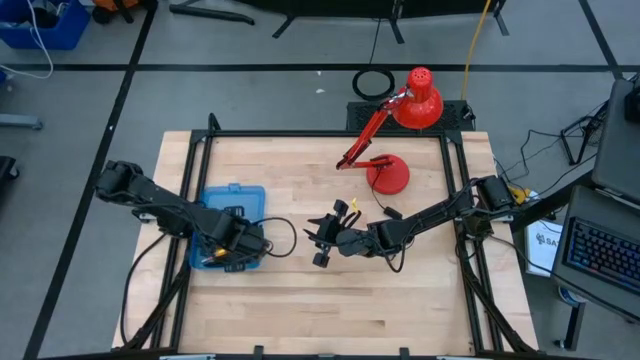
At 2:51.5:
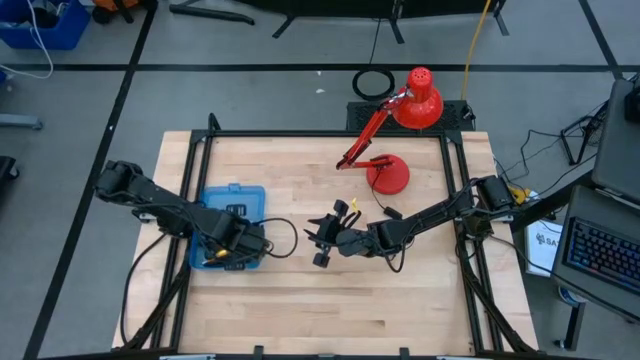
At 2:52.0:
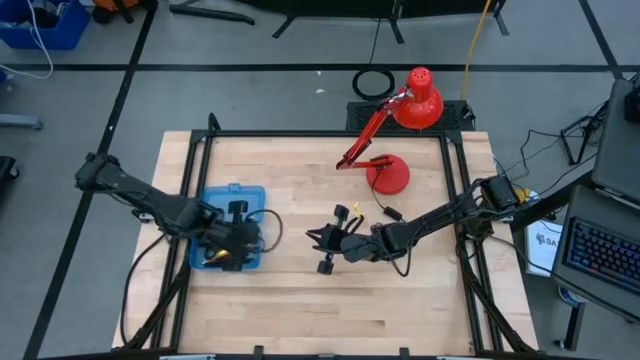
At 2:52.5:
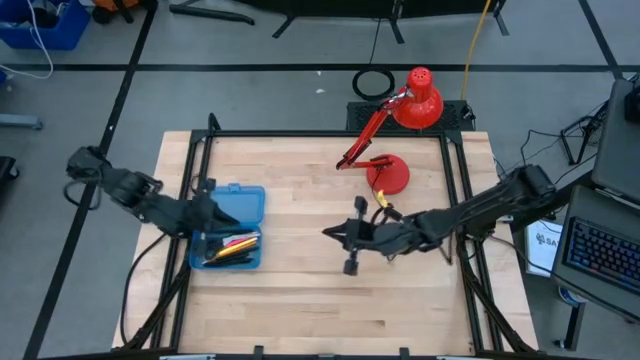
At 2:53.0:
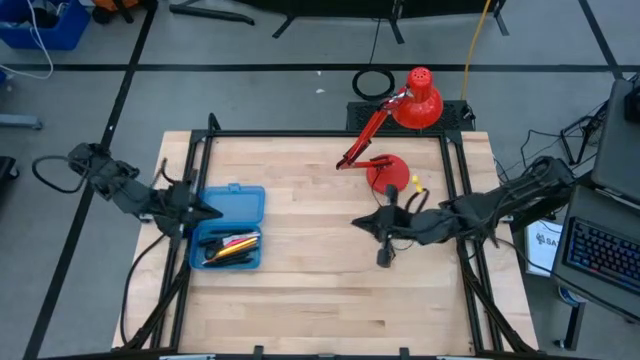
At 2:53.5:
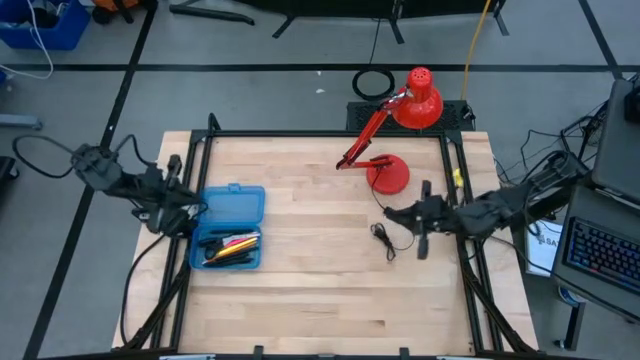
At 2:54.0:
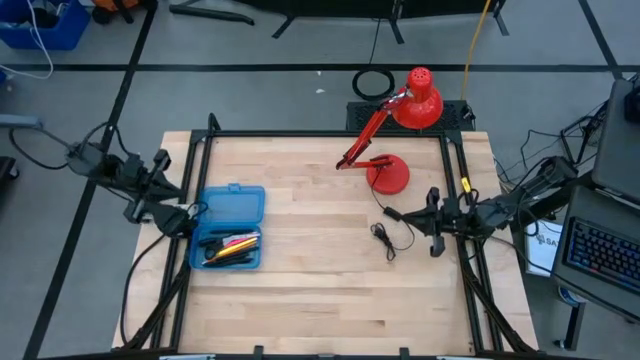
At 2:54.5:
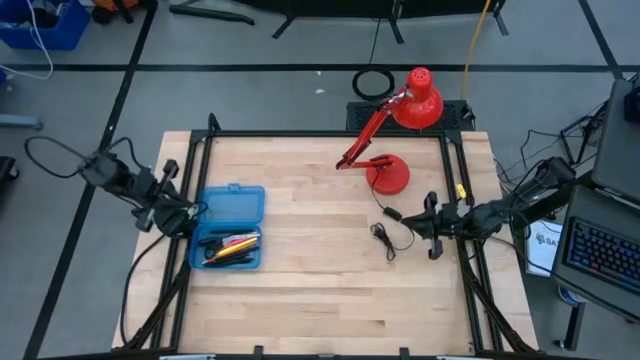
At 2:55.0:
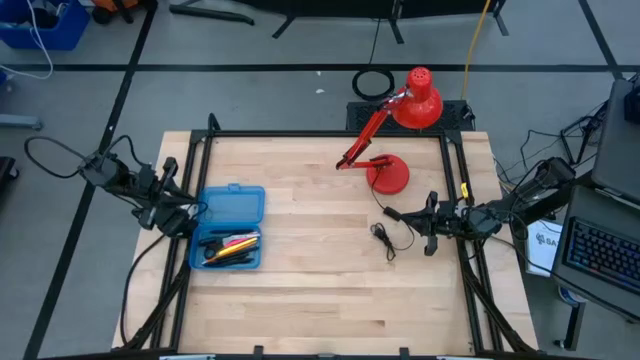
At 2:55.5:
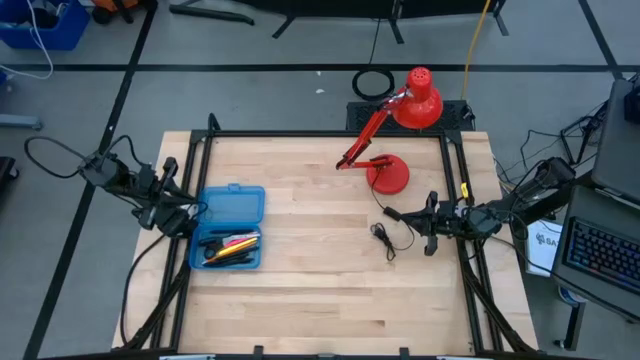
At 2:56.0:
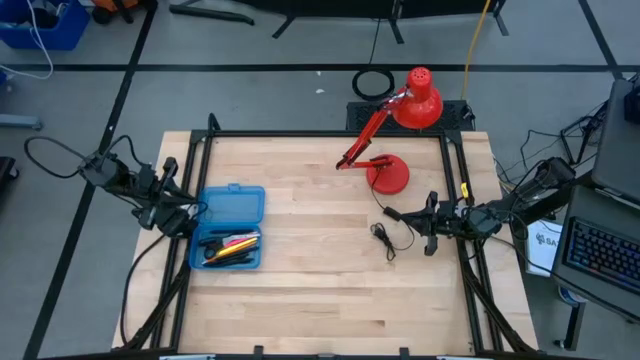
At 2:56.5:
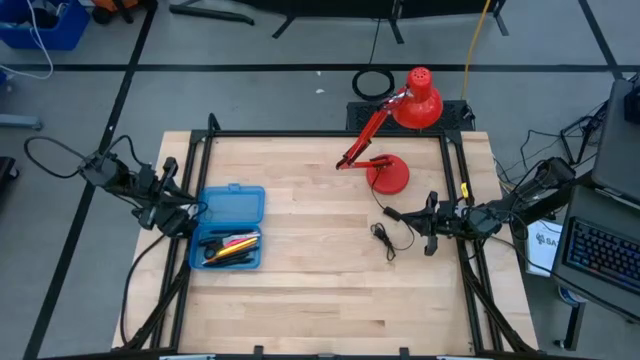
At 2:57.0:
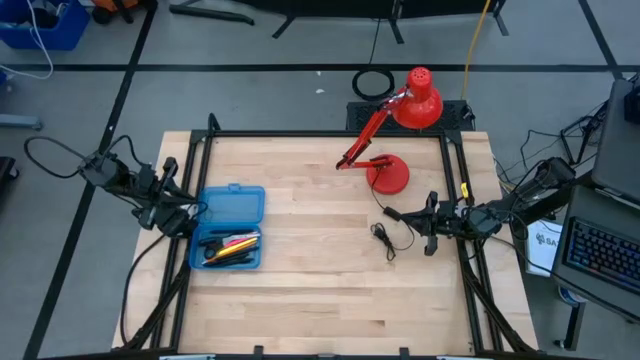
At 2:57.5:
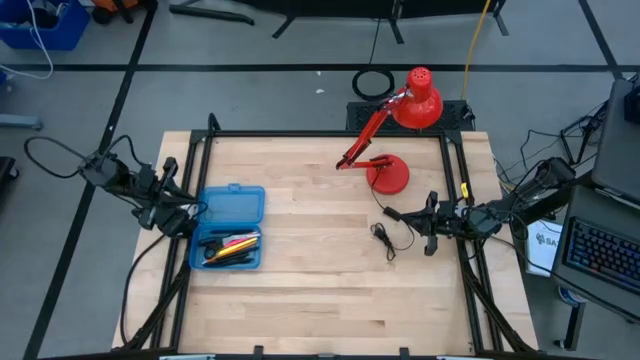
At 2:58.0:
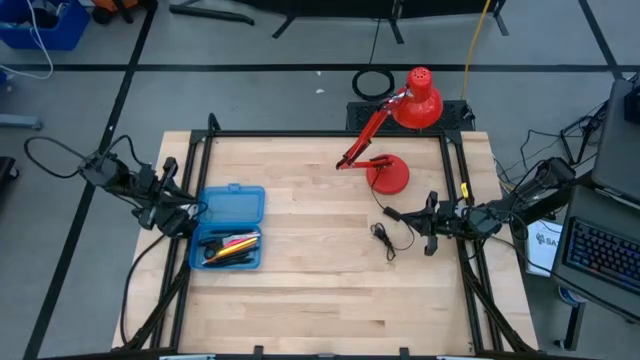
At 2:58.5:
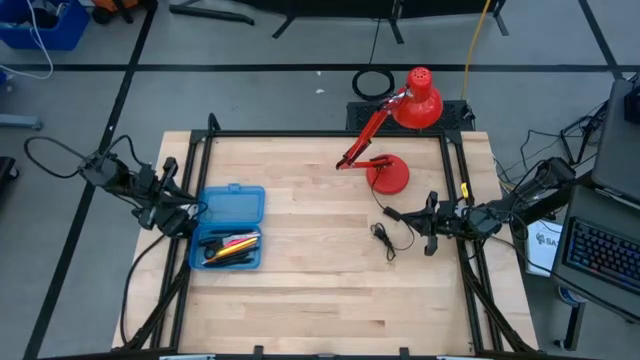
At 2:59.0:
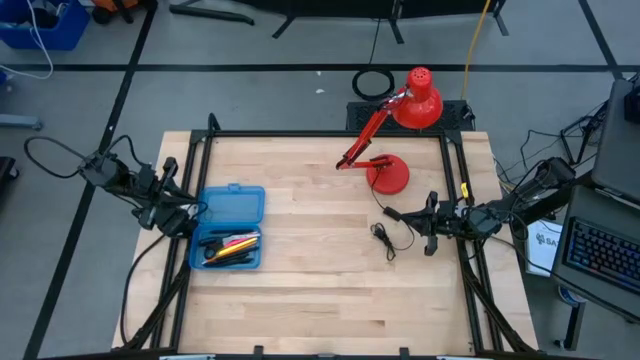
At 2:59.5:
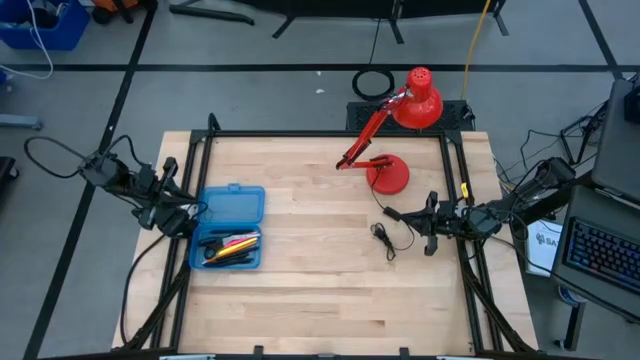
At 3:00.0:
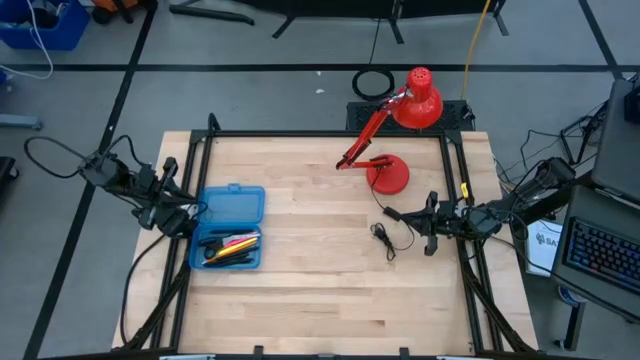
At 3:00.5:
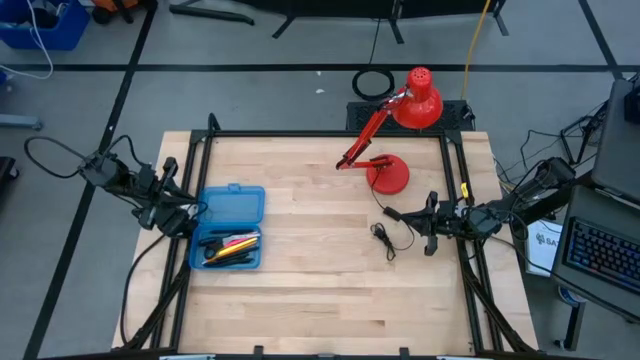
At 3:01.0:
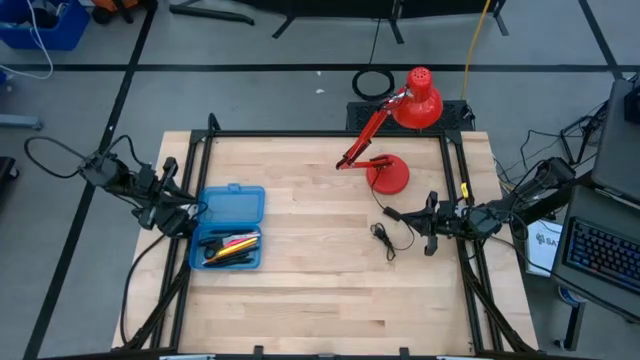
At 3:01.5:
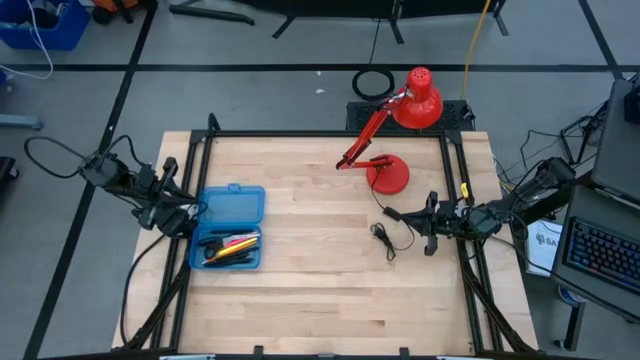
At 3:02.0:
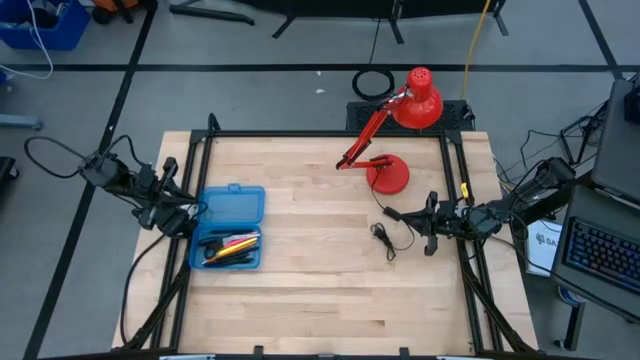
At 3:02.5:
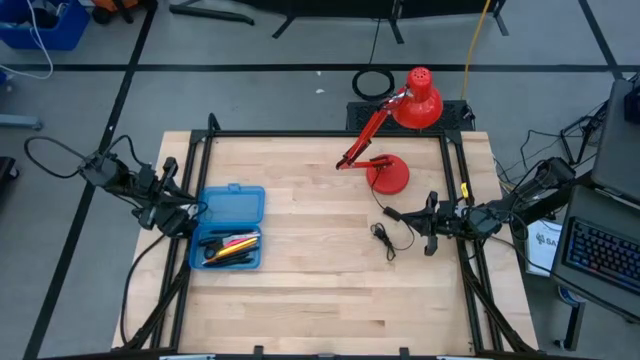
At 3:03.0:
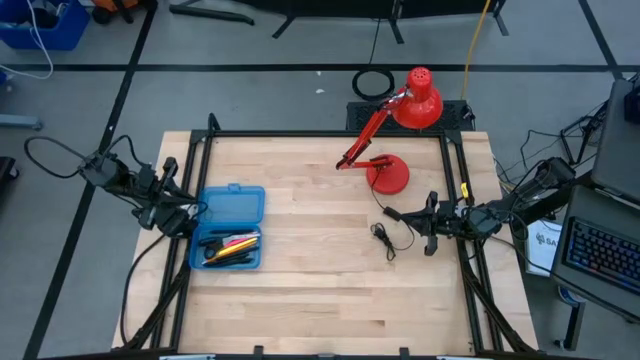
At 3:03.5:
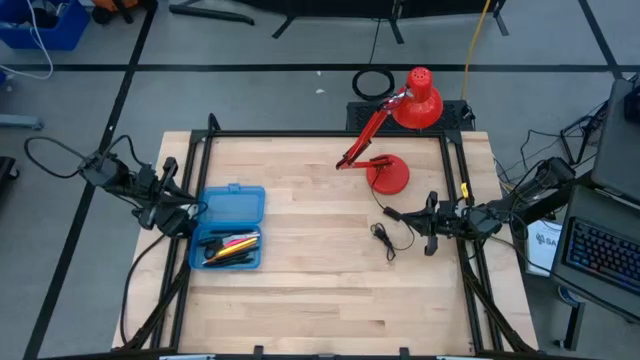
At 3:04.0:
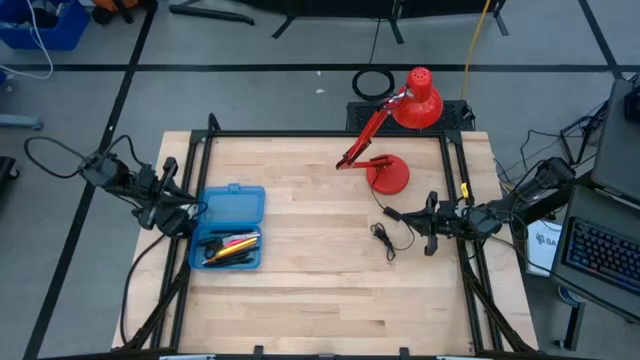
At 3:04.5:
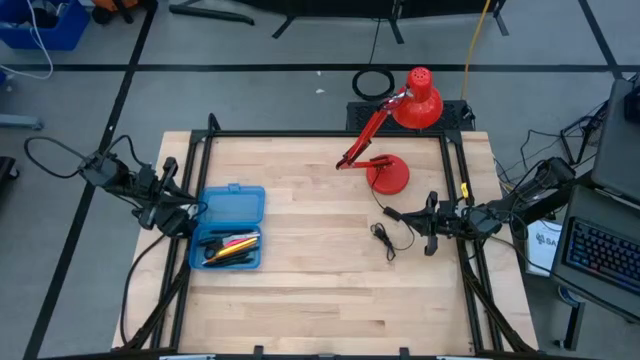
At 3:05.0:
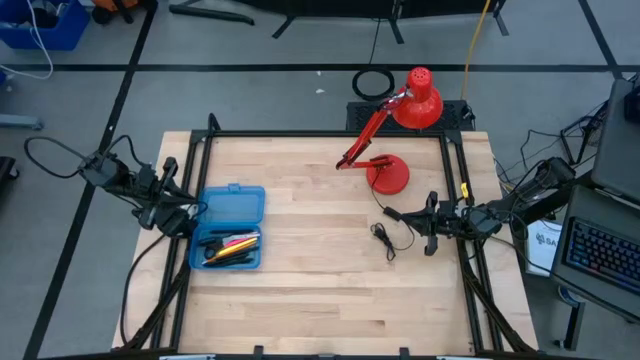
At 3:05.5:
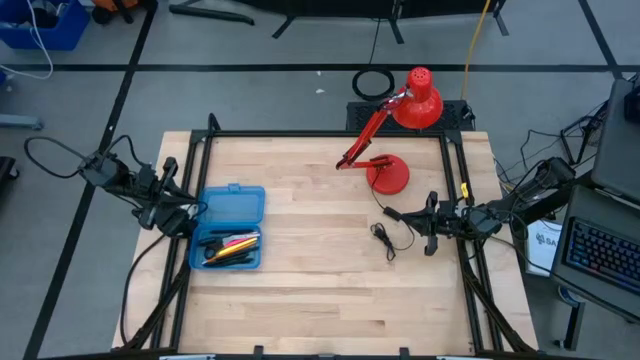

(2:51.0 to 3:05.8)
Task: Pick & place school supplies into a supply box
Return to Home Position

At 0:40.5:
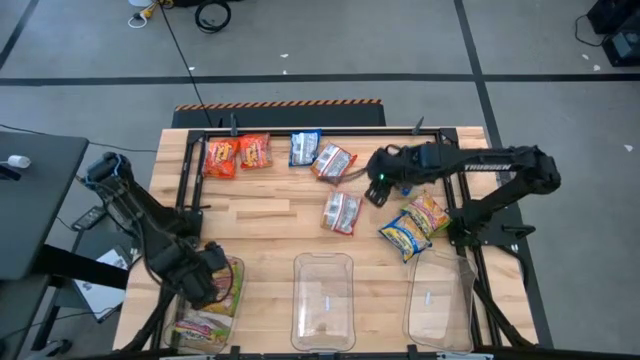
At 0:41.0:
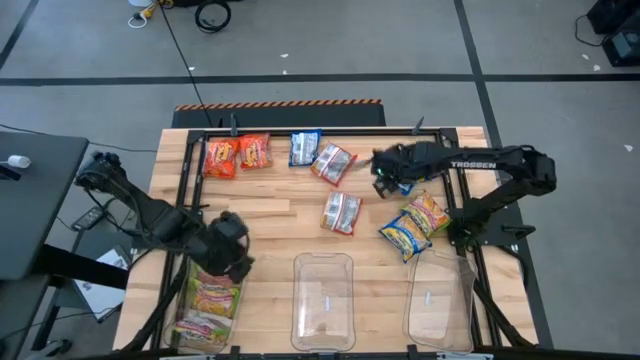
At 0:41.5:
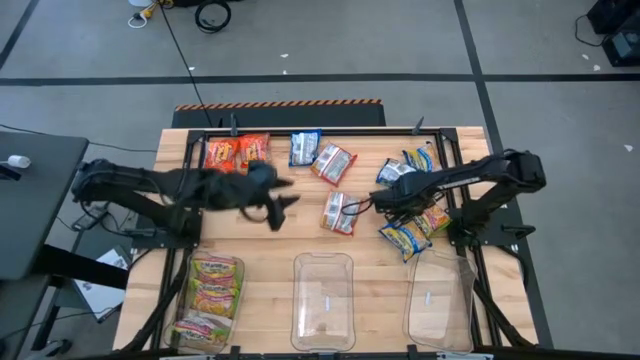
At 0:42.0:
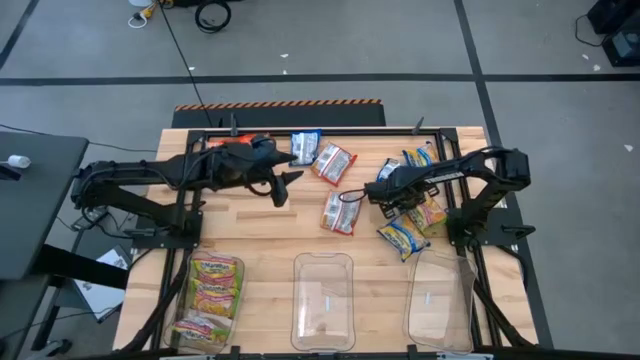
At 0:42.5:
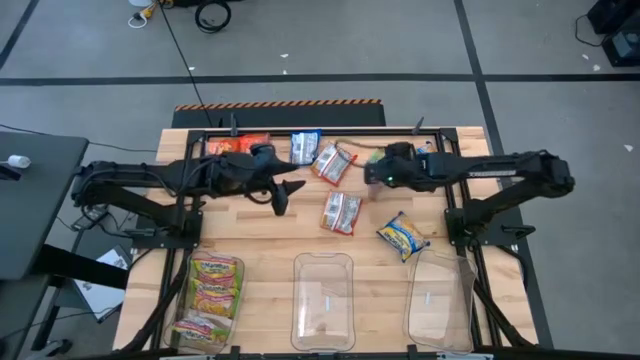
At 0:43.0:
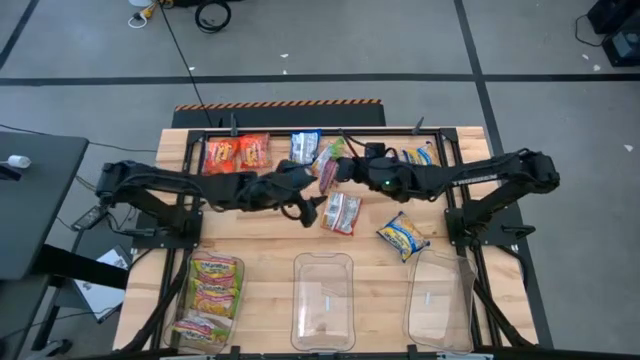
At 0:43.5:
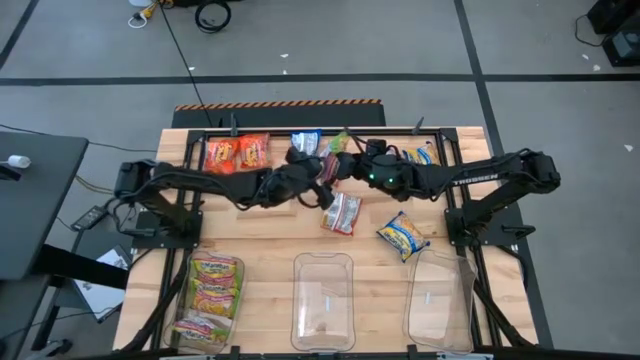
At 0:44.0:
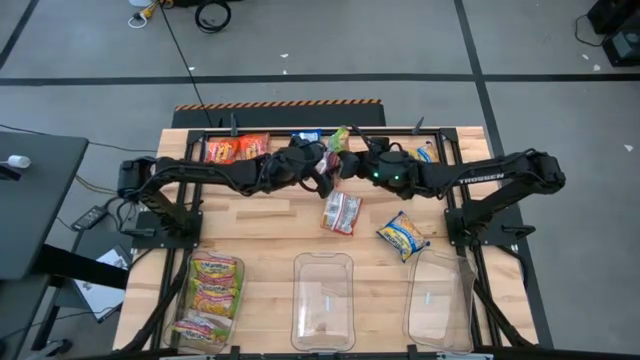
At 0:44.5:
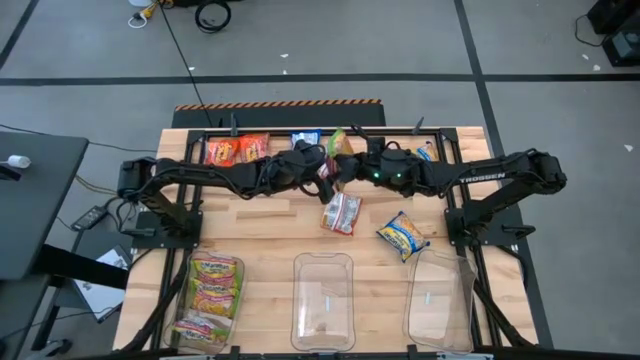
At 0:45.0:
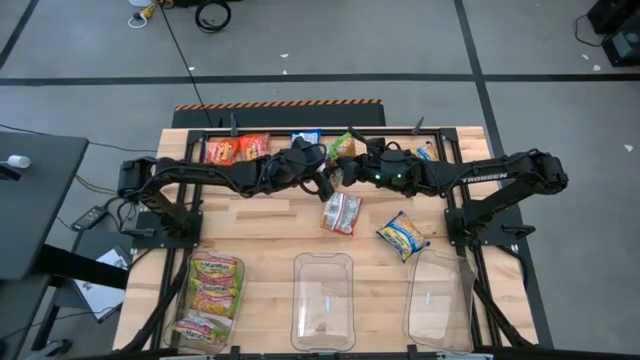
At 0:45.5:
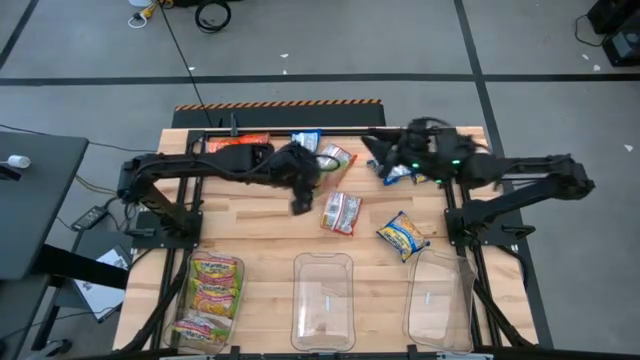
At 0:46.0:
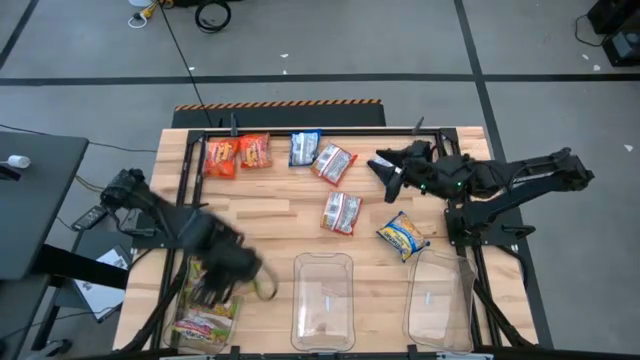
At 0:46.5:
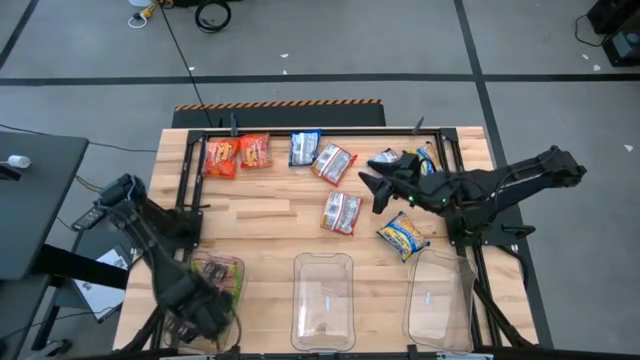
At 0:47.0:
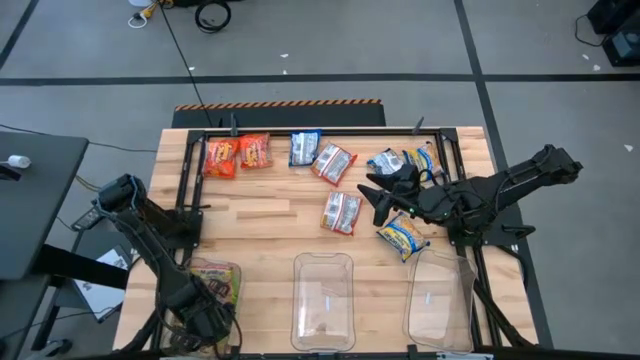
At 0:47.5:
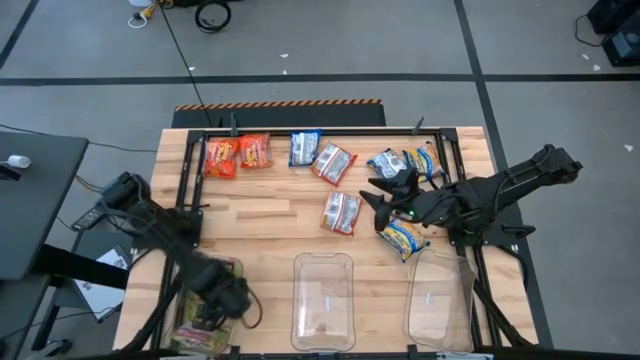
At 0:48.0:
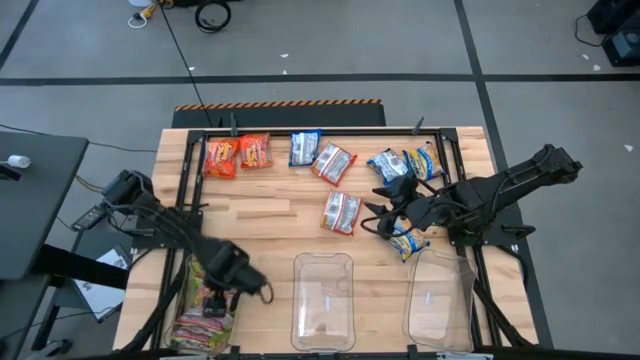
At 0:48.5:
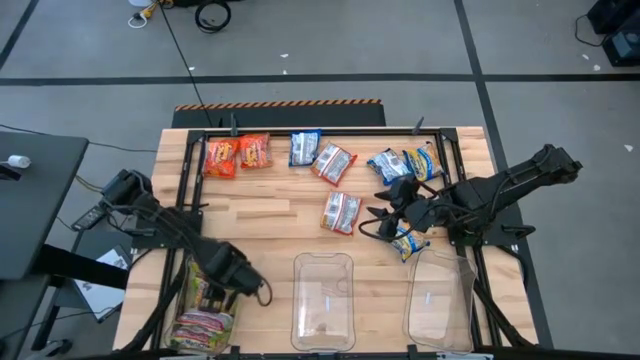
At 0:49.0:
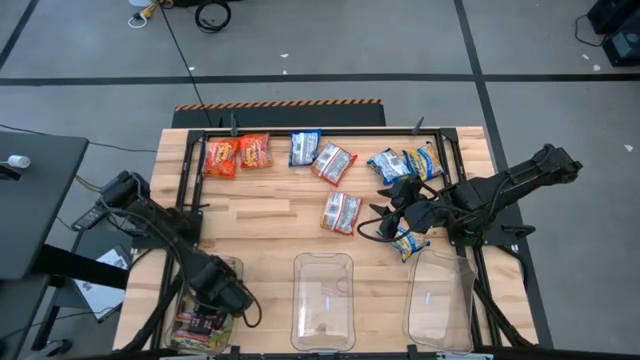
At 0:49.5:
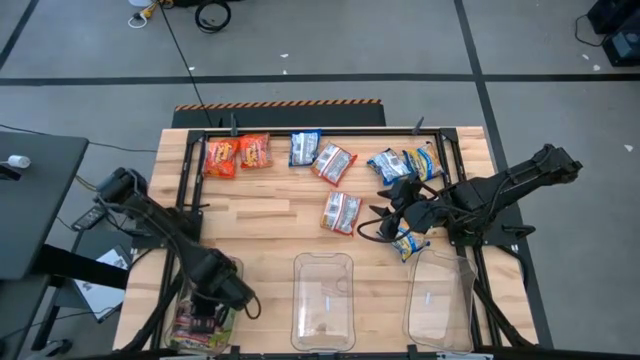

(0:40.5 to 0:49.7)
Task: Sort Maruchan noodles
Put the green noodle pack into the left transparent bin
